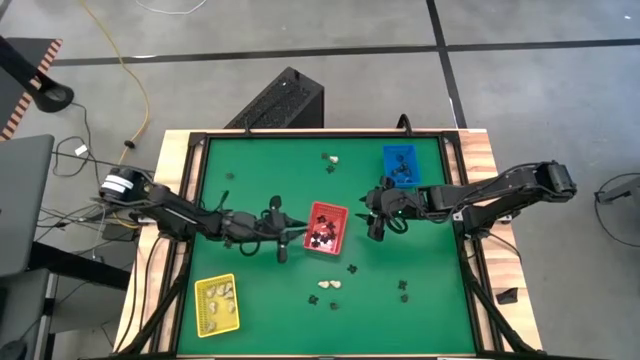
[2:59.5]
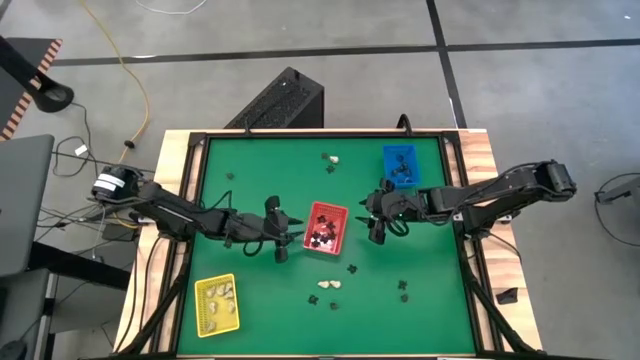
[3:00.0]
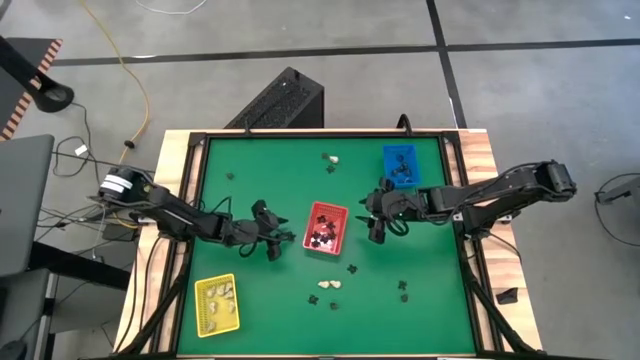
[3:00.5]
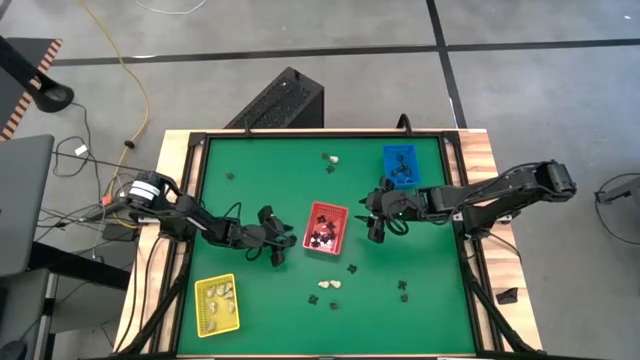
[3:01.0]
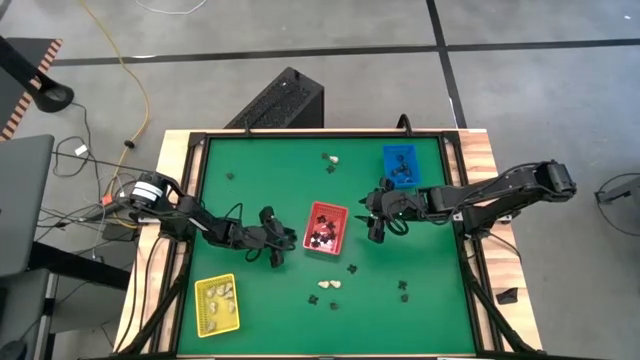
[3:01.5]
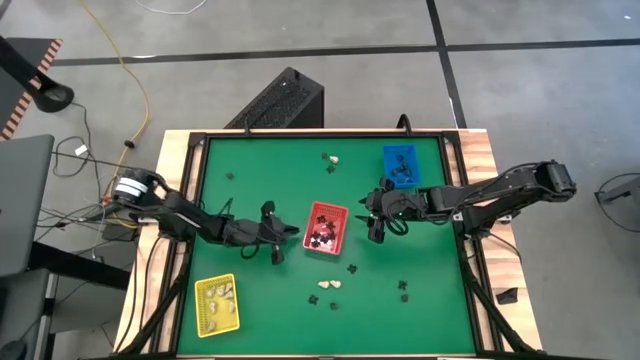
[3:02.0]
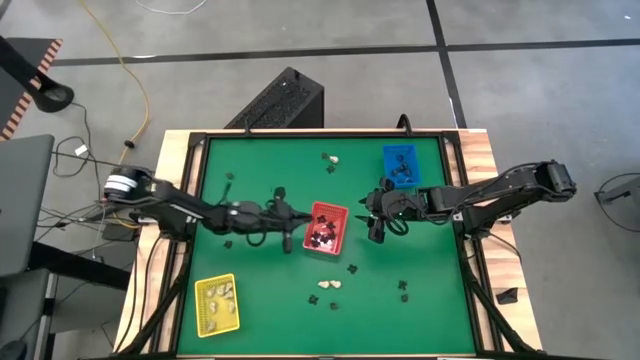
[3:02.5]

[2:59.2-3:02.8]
Task: Sort Halloween decoration
Put the black spider toy into the red bin

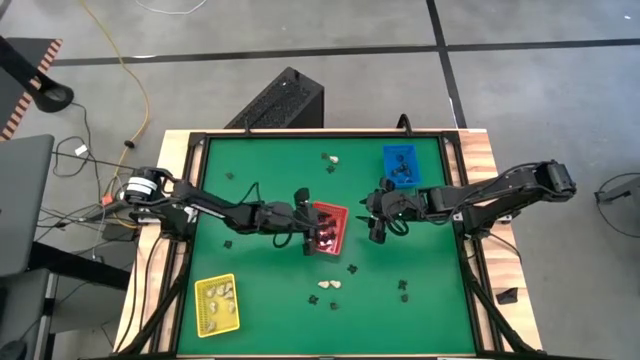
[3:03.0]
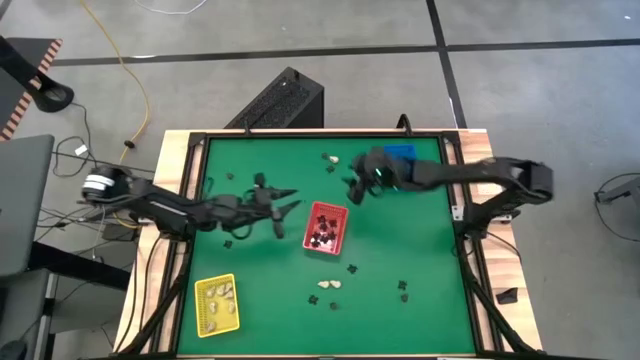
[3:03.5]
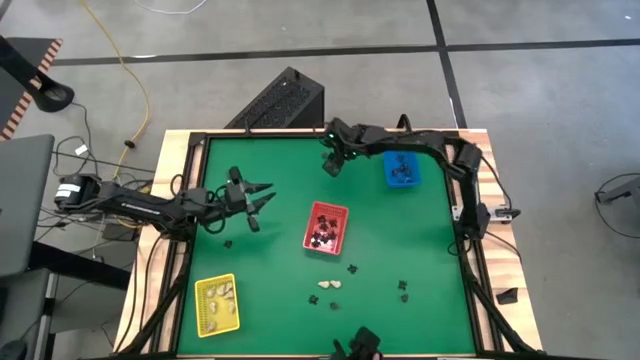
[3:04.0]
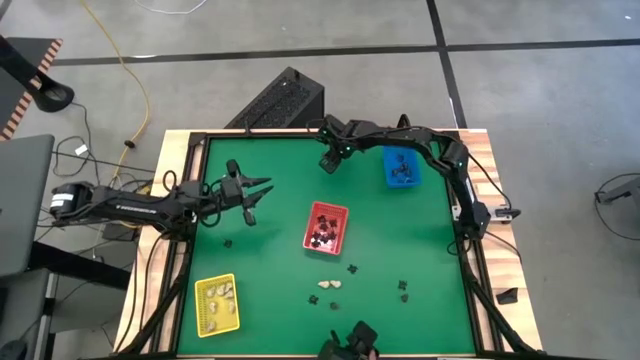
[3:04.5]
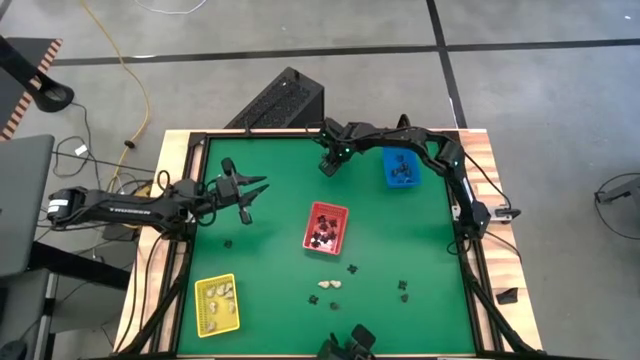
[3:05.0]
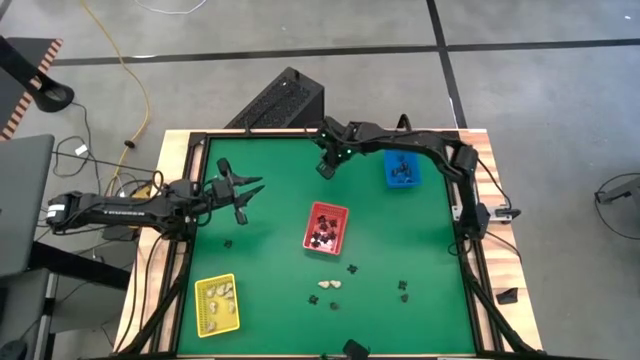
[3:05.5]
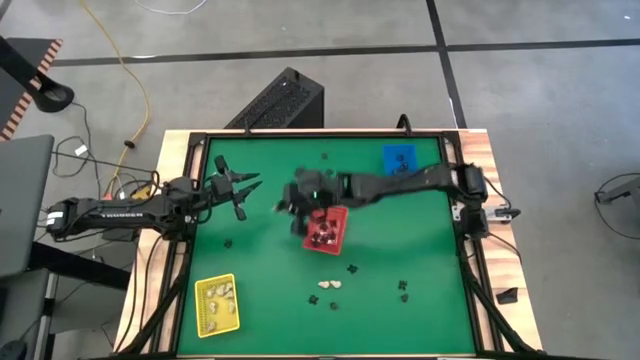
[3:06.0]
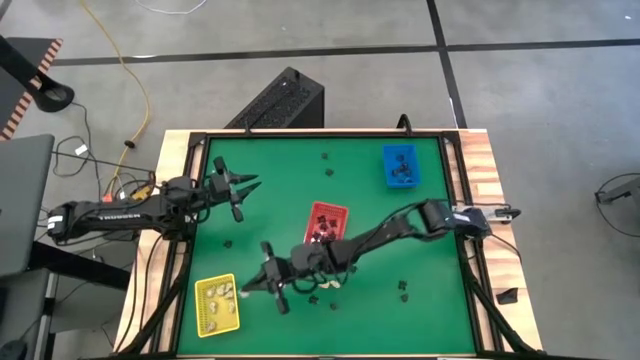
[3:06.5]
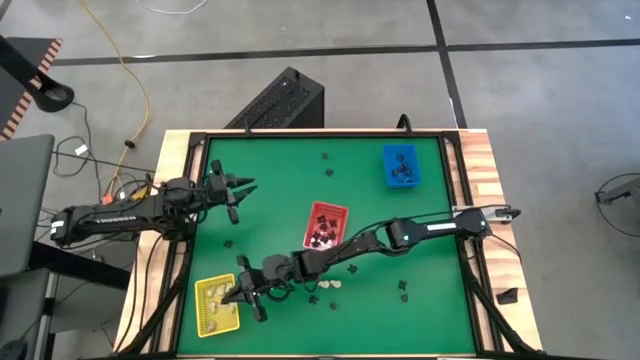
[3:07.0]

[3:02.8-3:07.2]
Put the white skull toy into the yellow bin

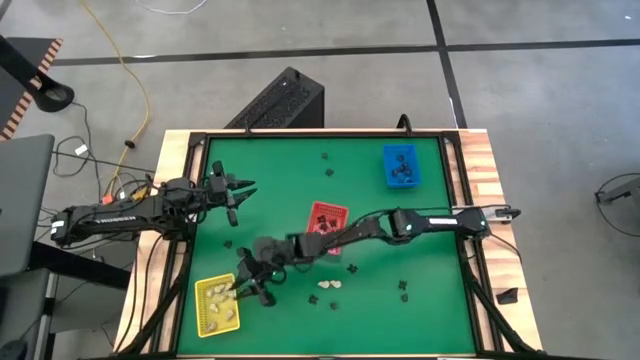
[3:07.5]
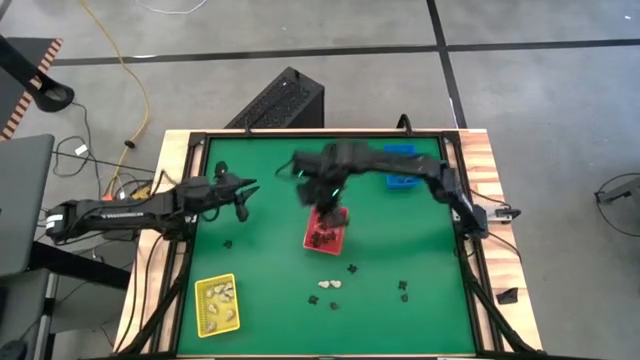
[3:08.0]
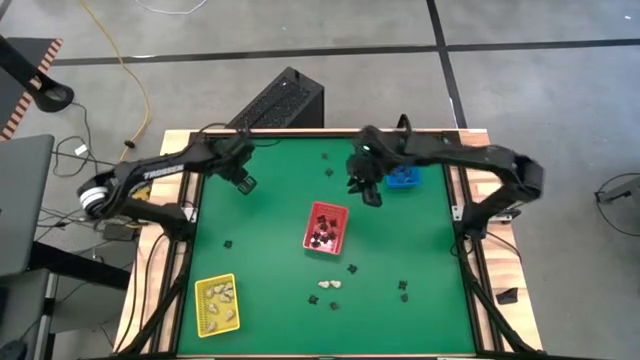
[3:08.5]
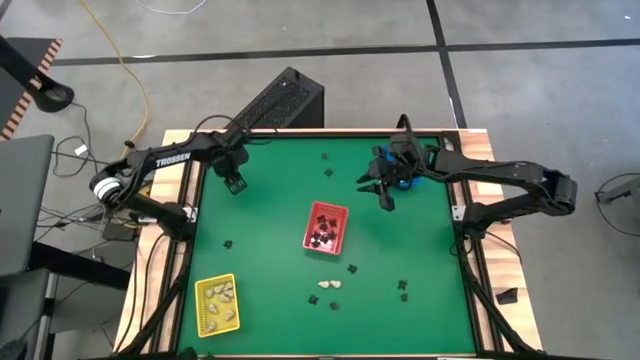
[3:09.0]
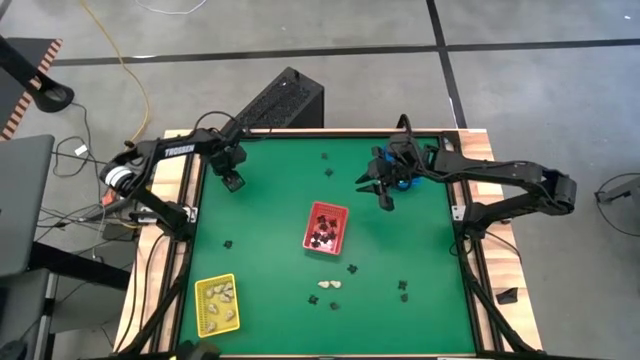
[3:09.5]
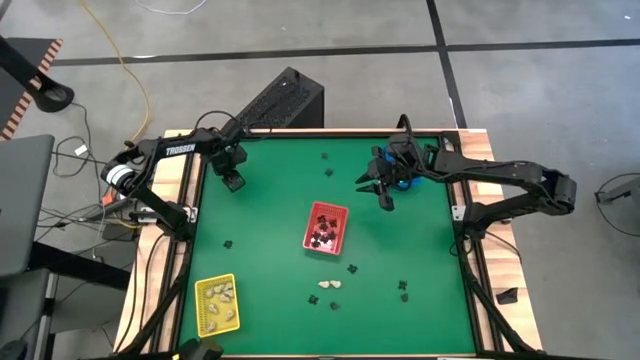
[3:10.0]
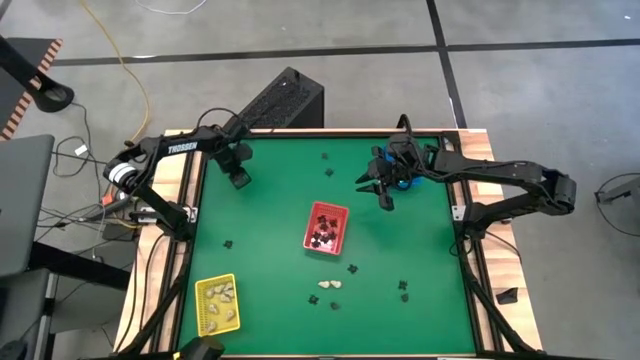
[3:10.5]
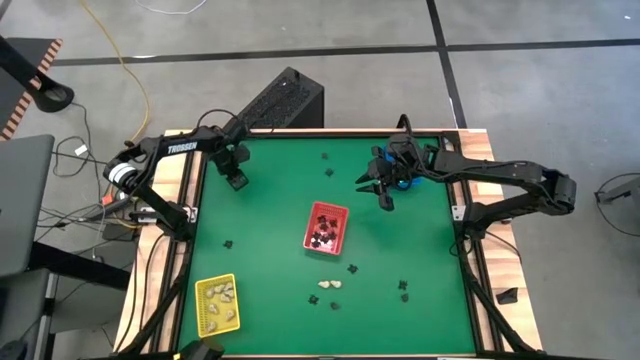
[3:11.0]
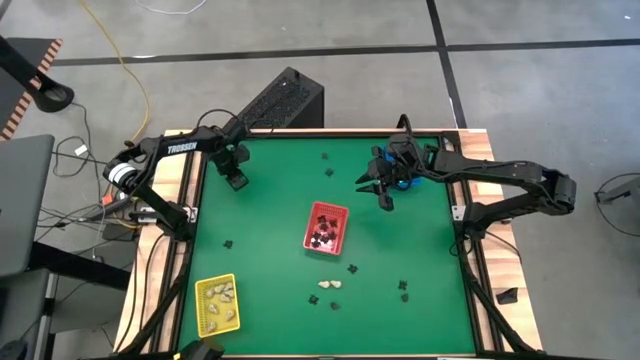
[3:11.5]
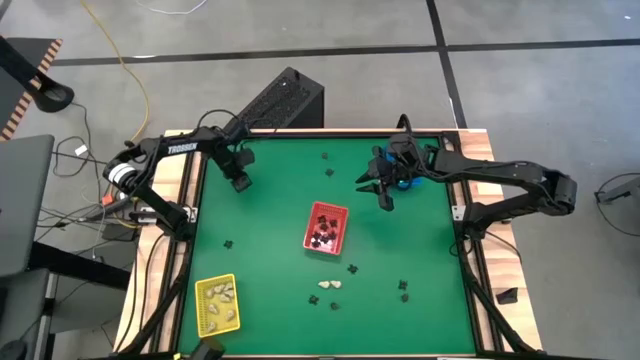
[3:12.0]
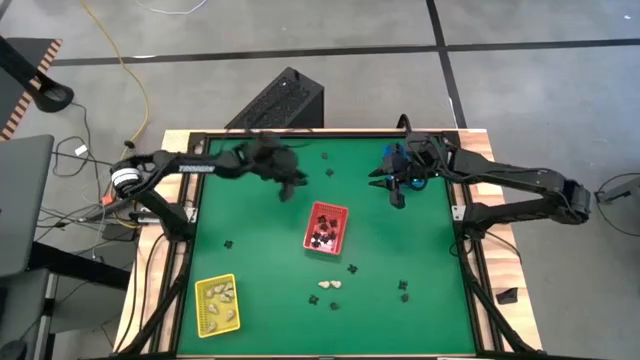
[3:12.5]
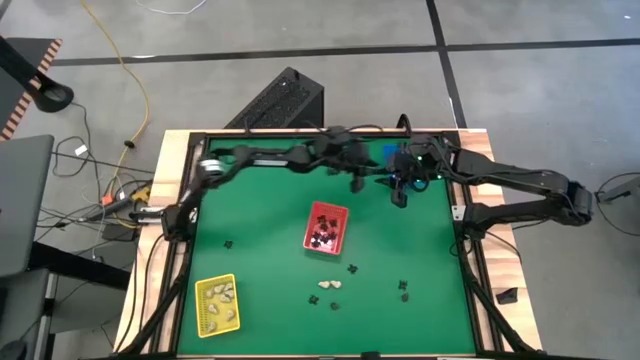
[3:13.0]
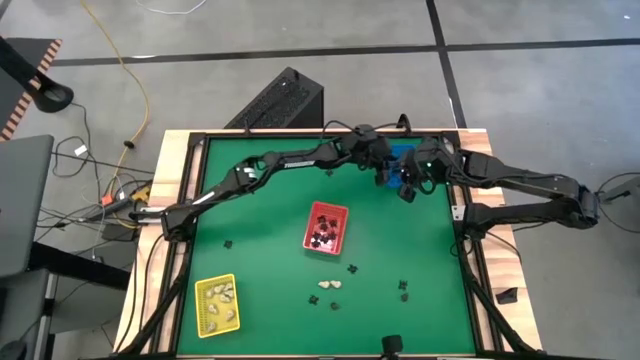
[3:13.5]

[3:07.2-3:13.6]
Put the black skull toy into the blue bin

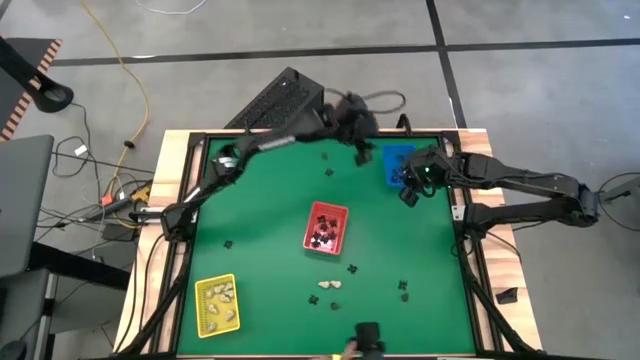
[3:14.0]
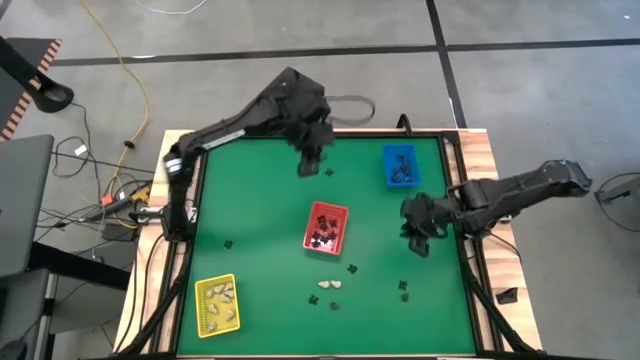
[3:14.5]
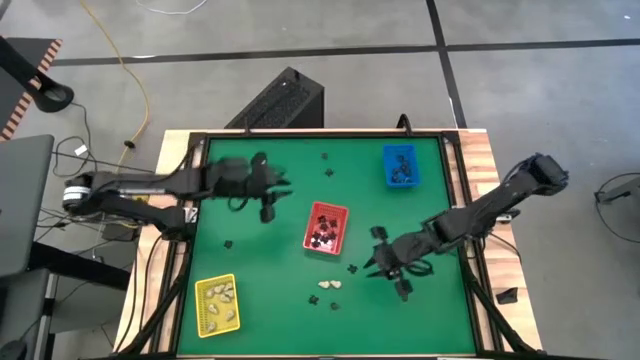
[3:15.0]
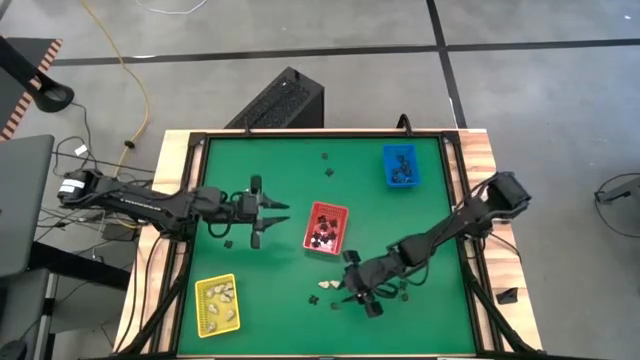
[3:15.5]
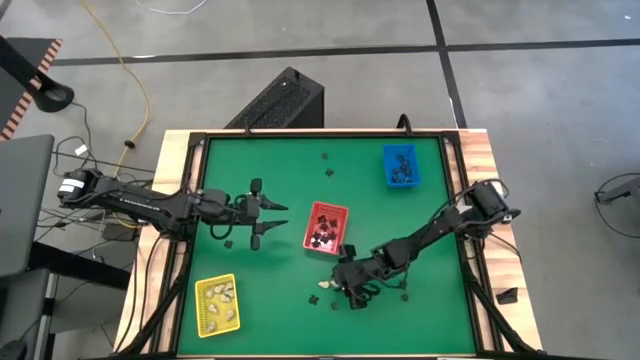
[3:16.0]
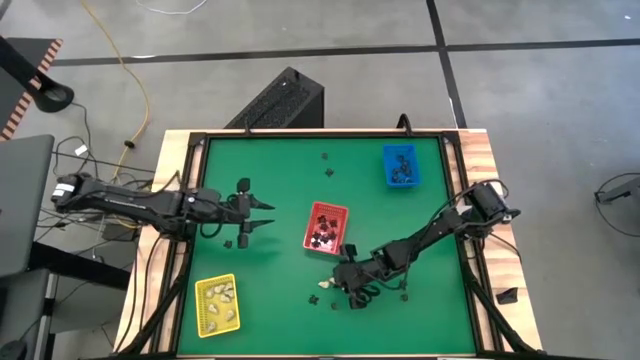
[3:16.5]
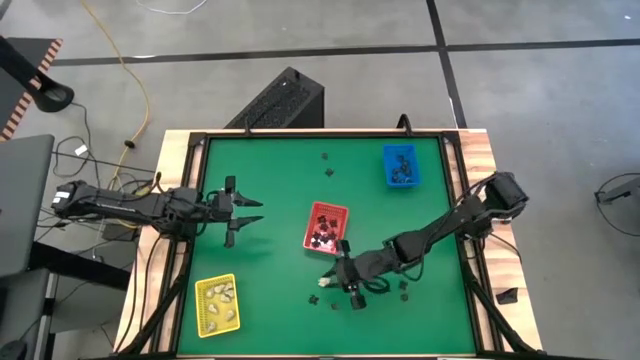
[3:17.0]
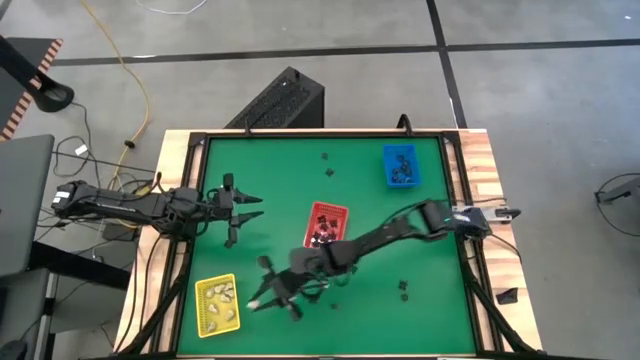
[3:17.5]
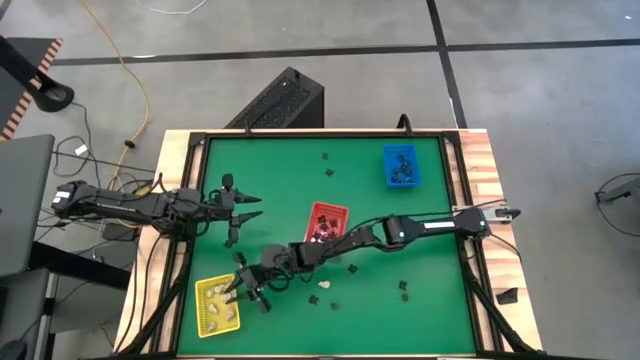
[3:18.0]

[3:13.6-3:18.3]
Put the white skull toy into the yellow bin

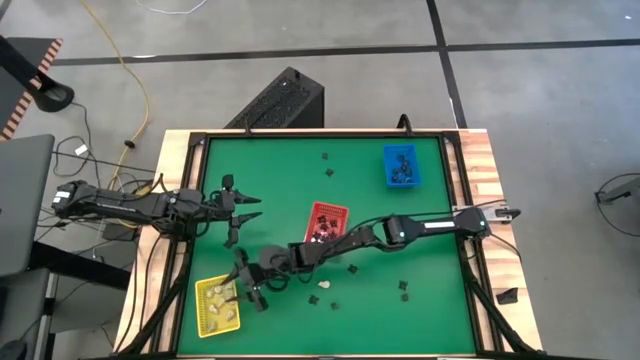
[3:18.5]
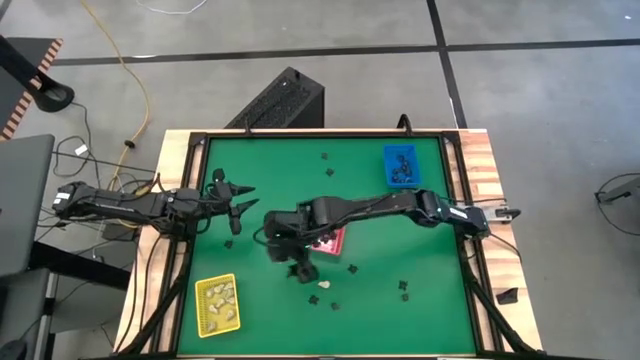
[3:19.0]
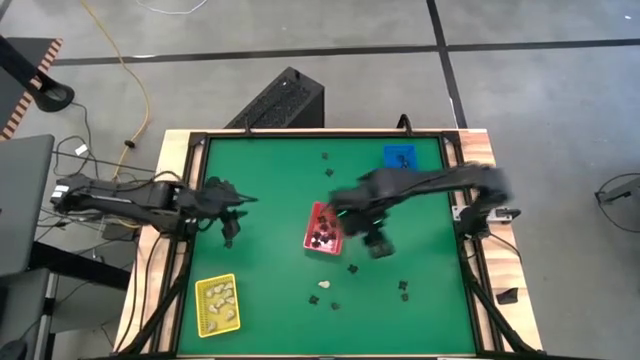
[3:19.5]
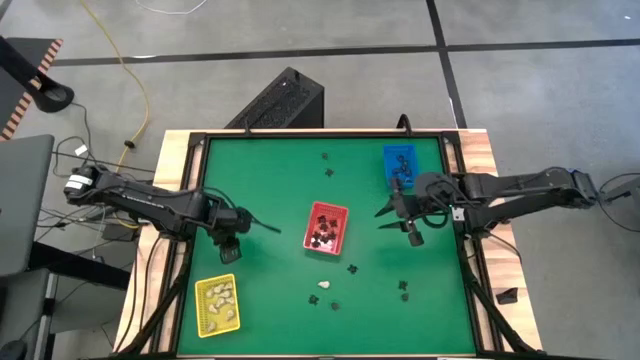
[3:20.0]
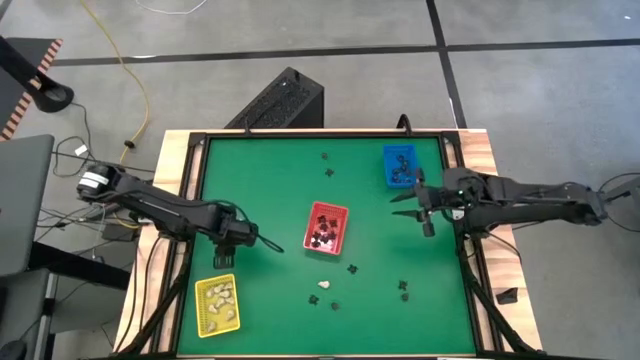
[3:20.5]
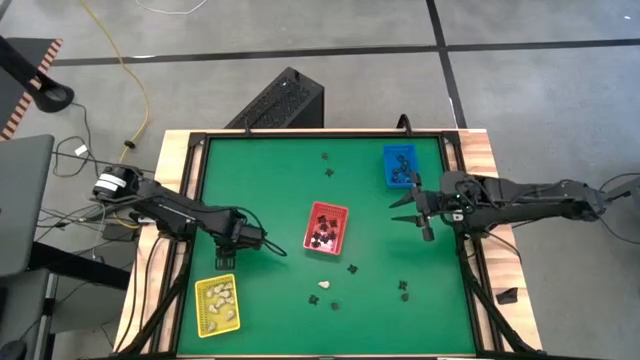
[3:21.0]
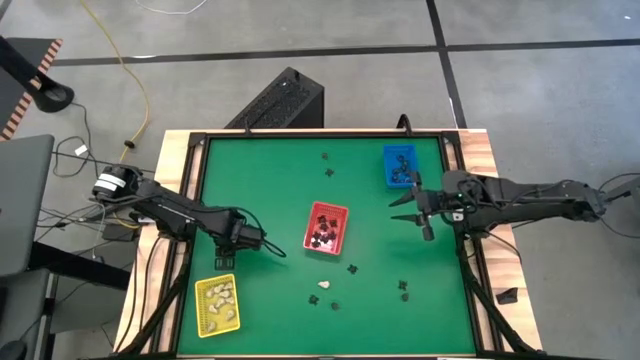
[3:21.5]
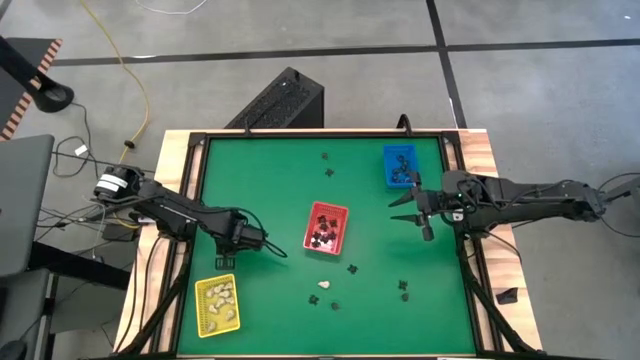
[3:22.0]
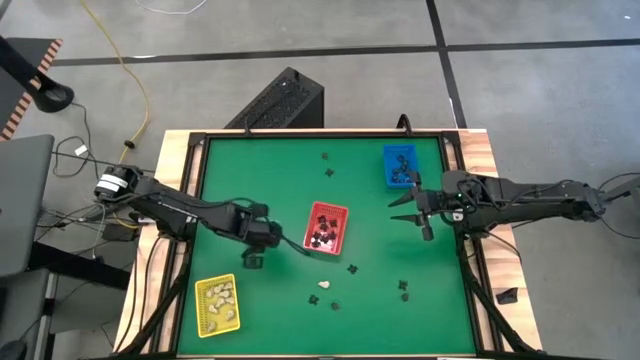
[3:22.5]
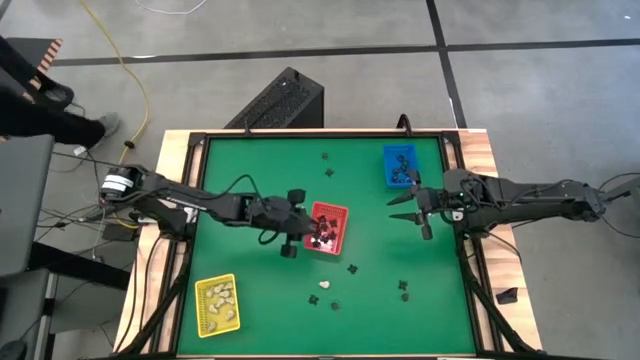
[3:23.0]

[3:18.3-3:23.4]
Put the black spider toy into the red bin
